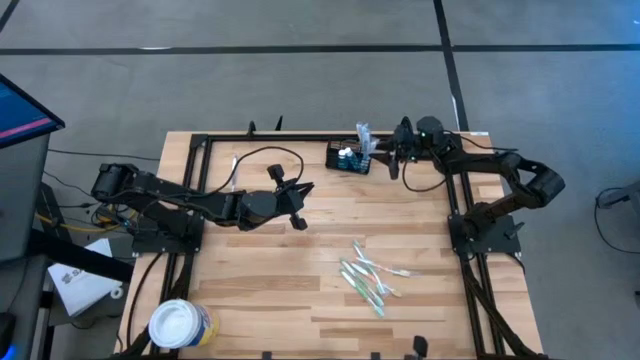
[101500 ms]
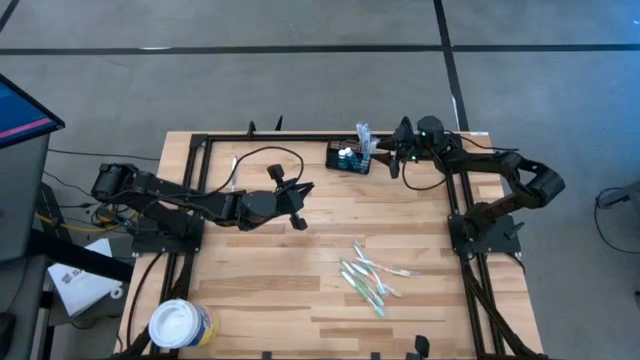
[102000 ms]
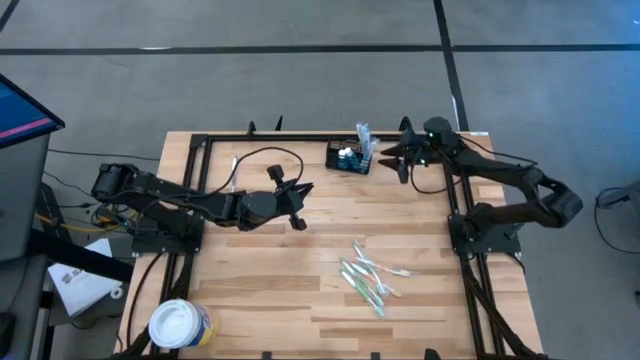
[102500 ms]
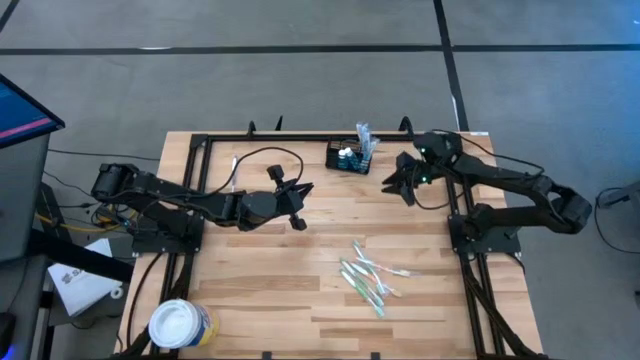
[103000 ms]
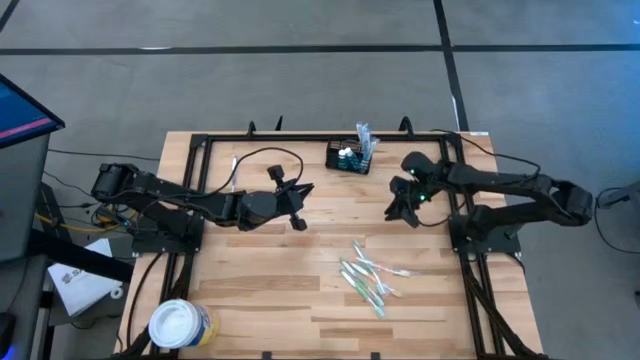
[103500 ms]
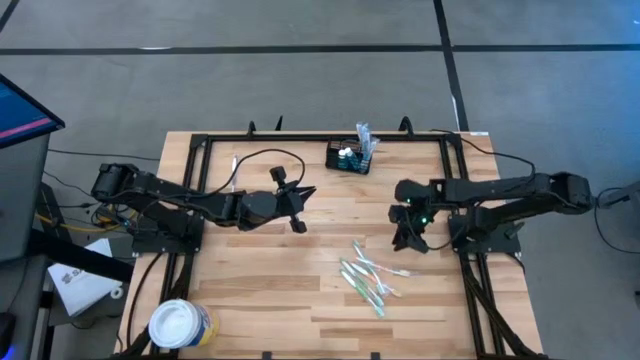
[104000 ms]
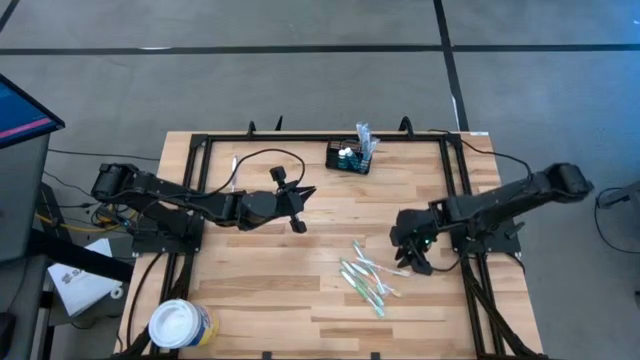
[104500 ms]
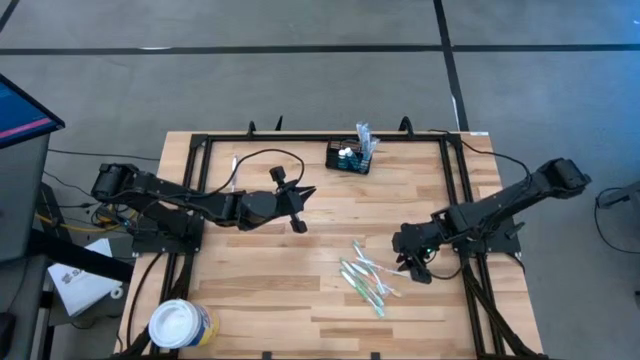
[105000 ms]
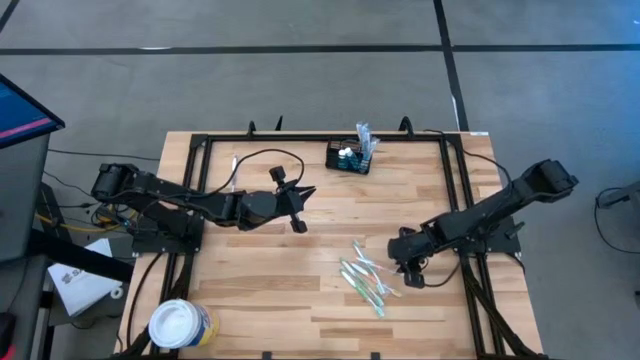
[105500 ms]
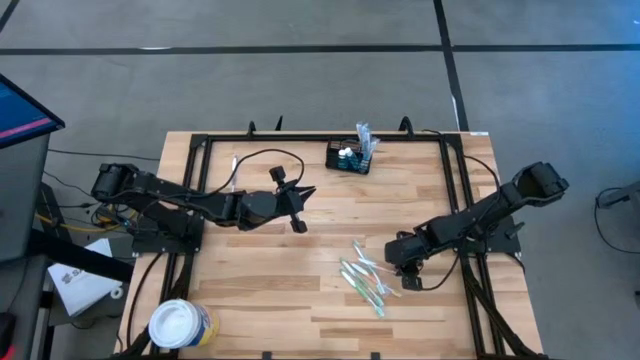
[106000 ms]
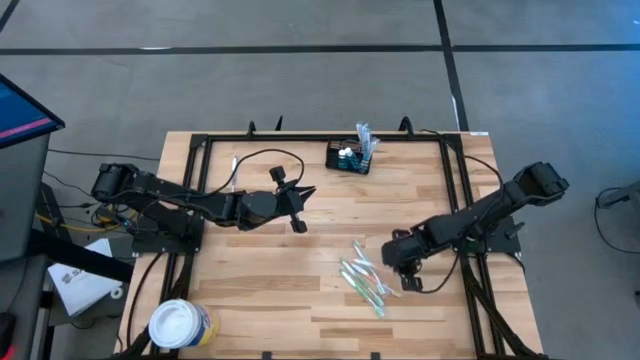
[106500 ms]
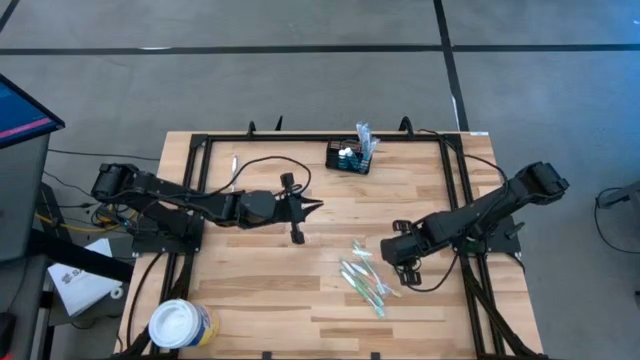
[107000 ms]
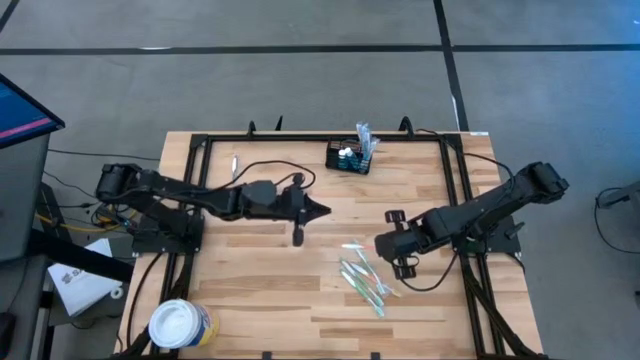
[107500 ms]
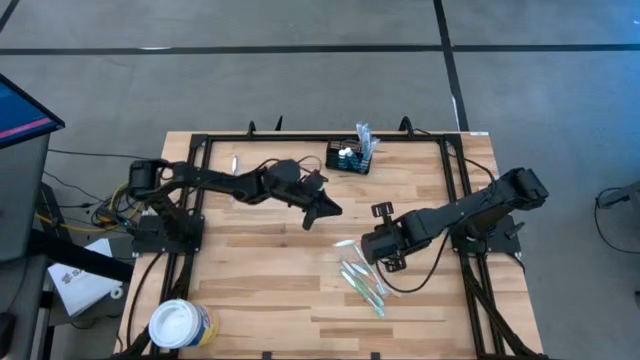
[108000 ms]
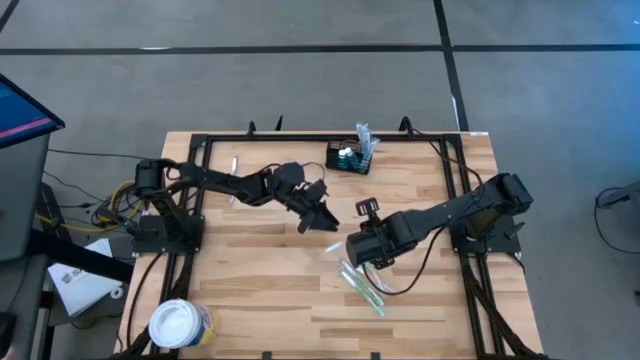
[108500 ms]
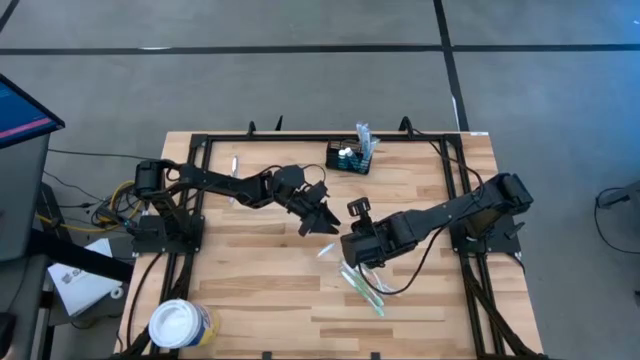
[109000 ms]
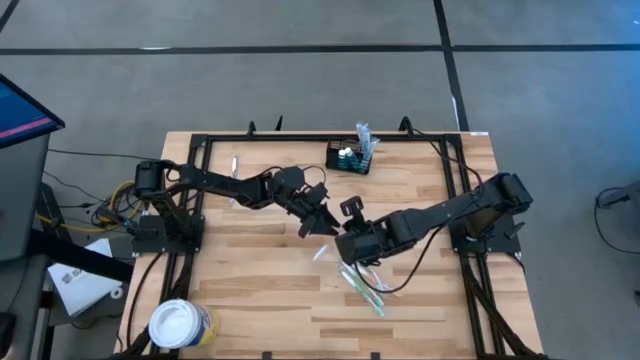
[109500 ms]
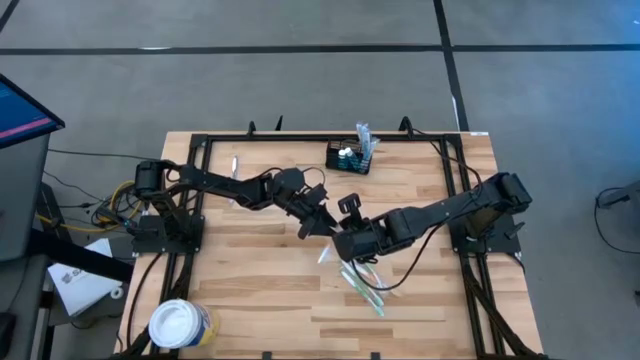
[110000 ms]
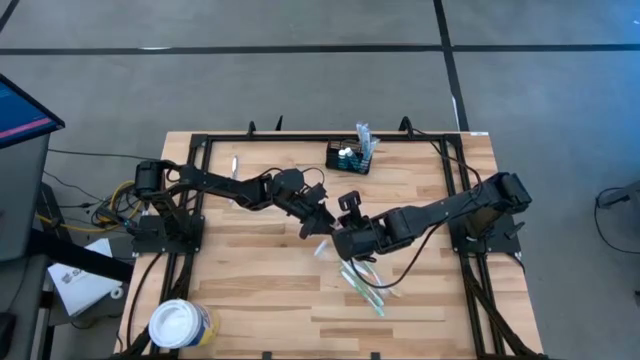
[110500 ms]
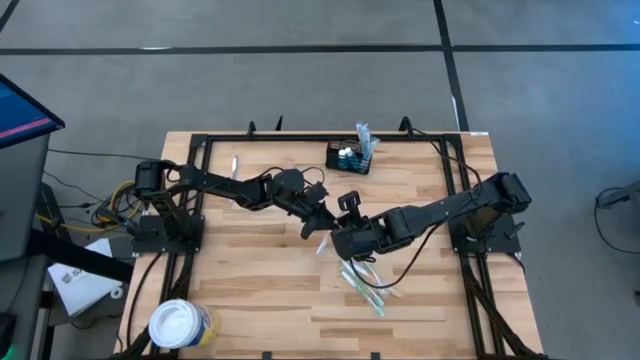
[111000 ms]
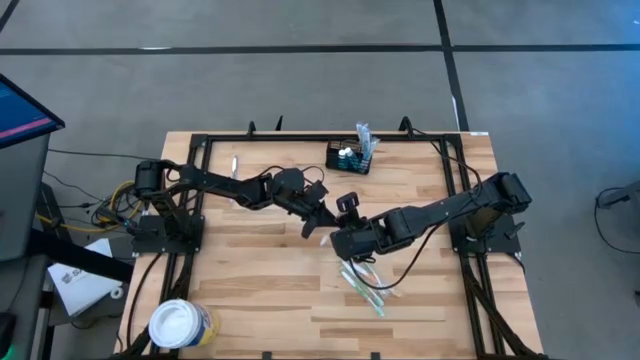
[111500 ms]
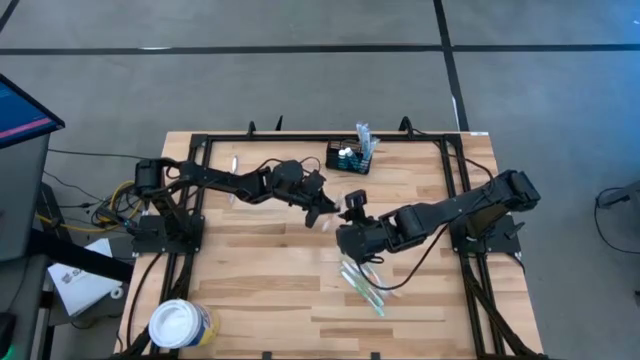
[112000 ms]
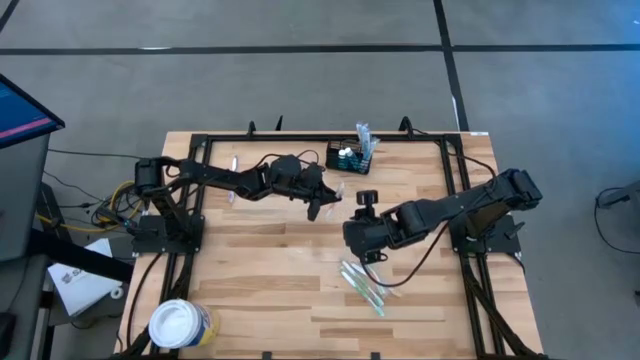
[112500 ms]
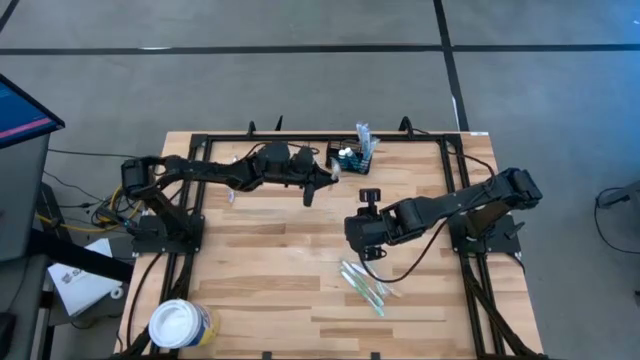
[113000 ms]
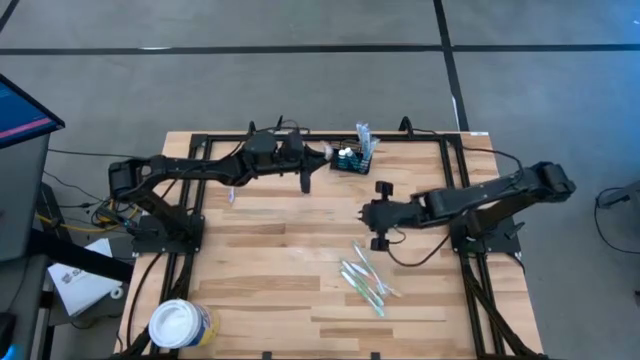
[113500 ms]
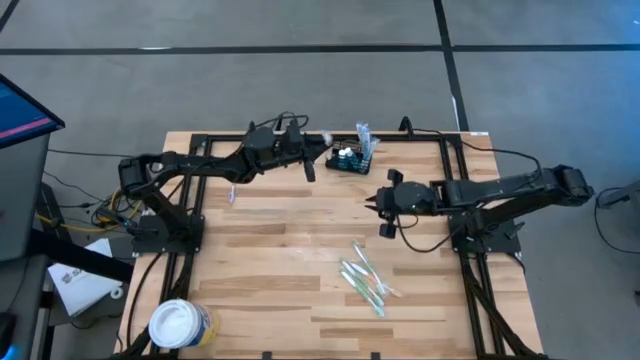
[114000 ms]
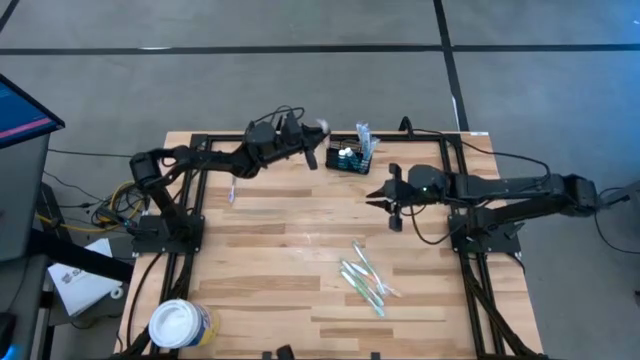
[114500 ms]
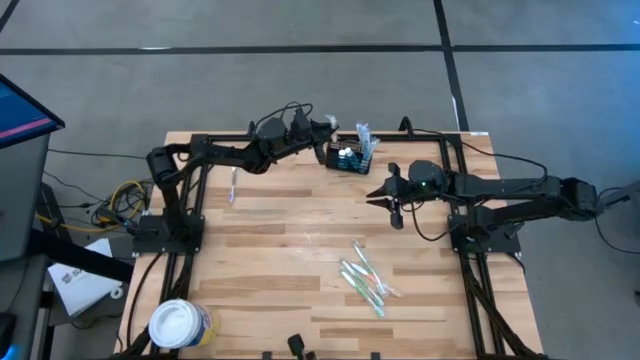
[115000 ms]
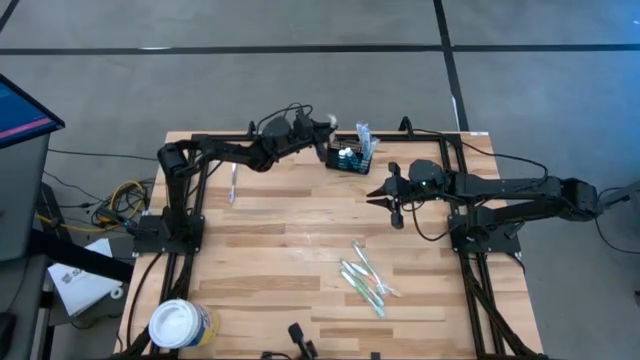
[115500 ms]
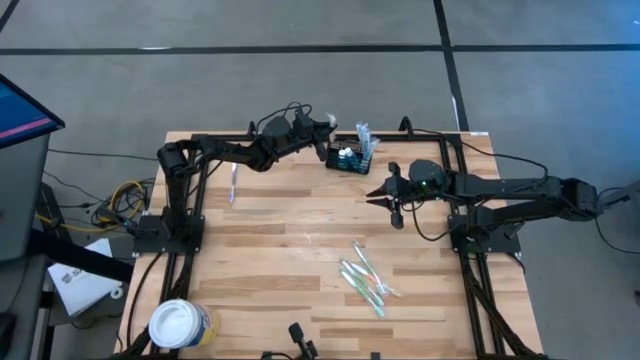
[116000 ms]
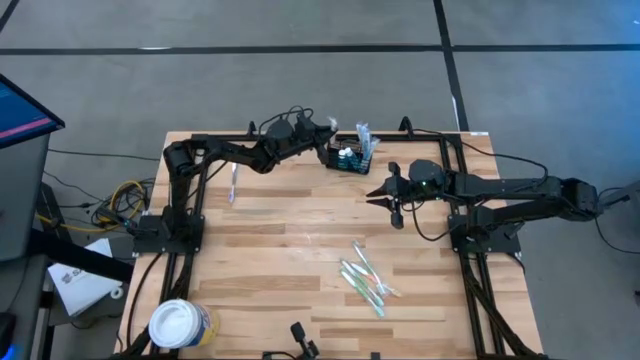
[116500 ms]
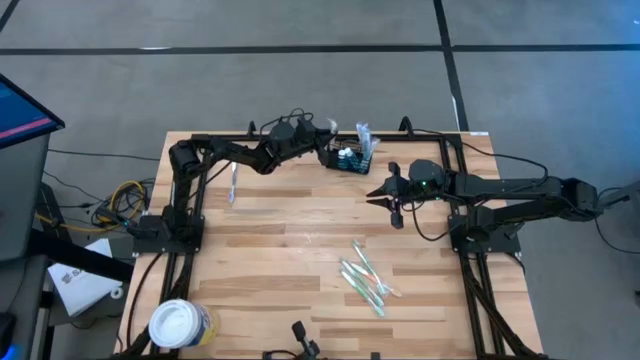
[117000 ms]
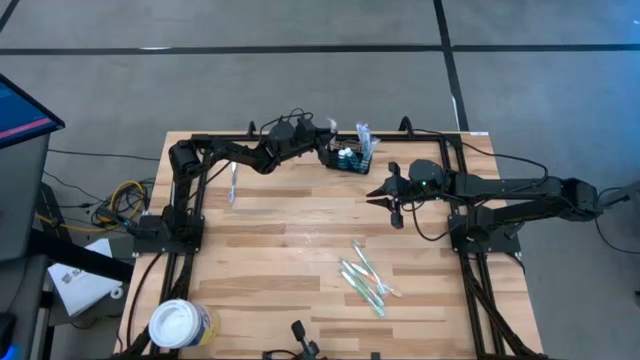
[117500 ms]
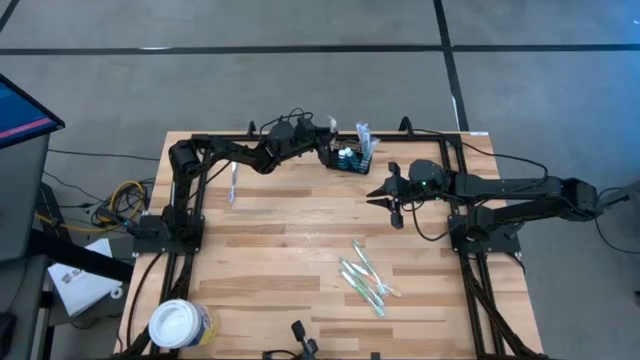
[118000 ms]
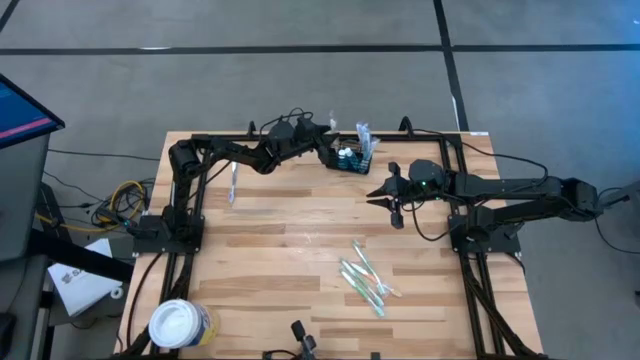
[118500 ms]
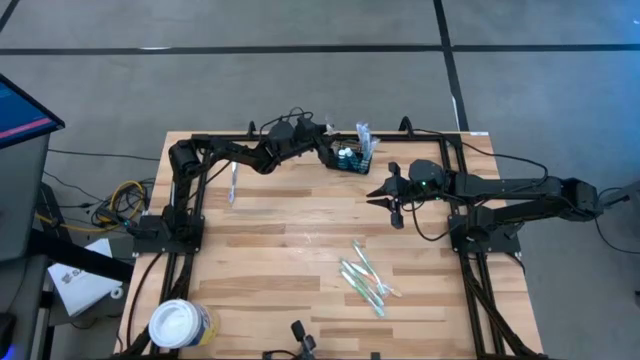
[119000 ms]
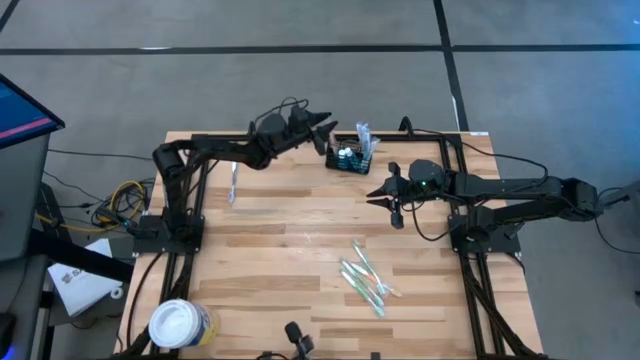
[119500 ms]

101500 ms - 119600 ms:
Task: Pick & Place toothbrushing station
Put the orange toothbrush into the mesh organizer

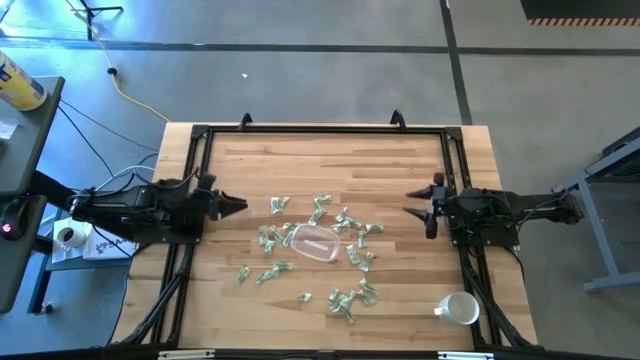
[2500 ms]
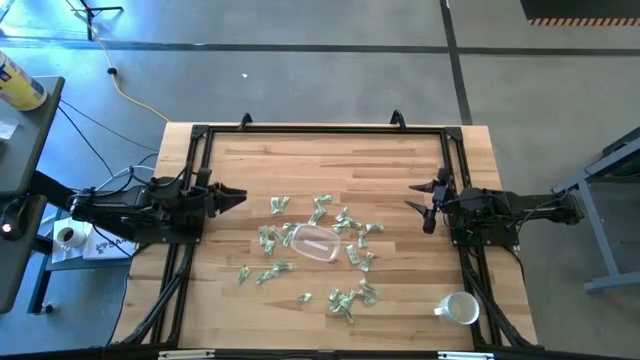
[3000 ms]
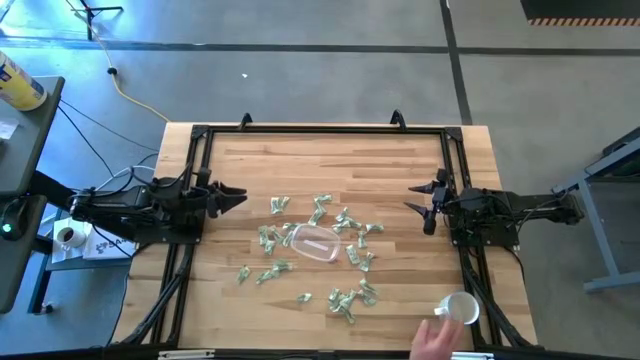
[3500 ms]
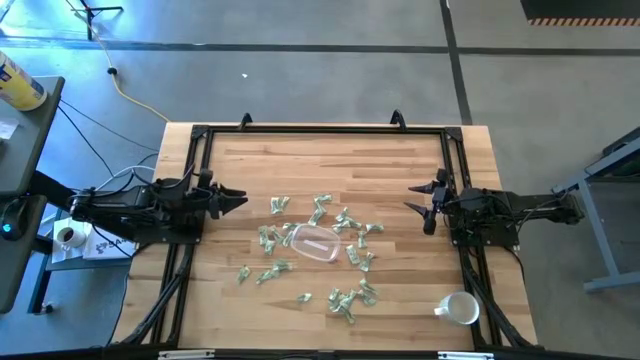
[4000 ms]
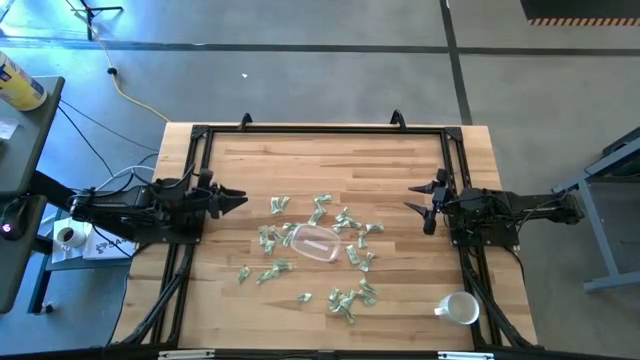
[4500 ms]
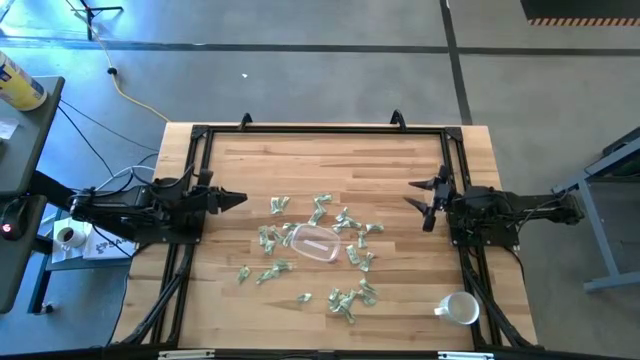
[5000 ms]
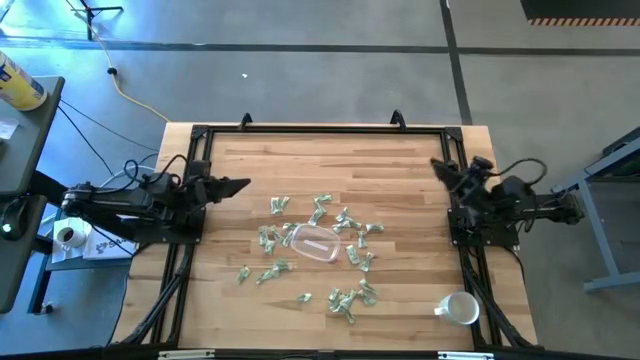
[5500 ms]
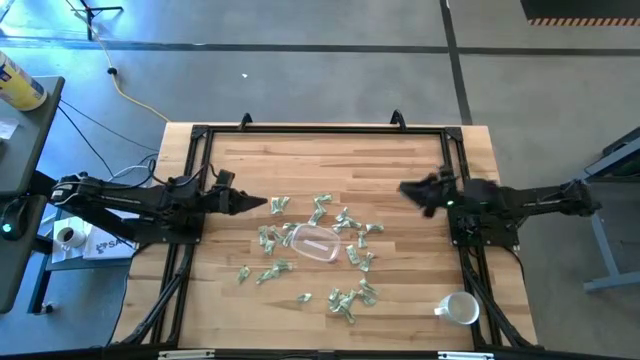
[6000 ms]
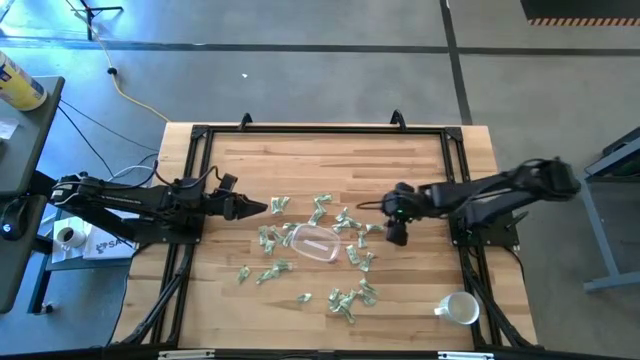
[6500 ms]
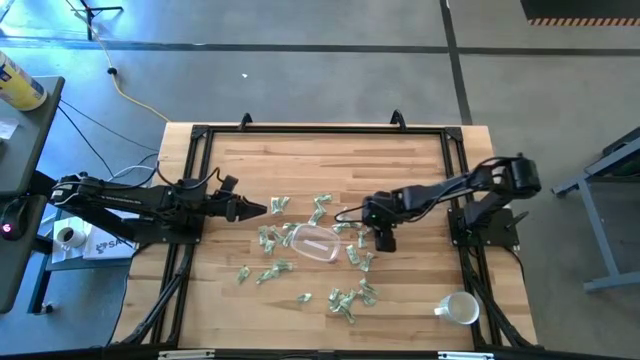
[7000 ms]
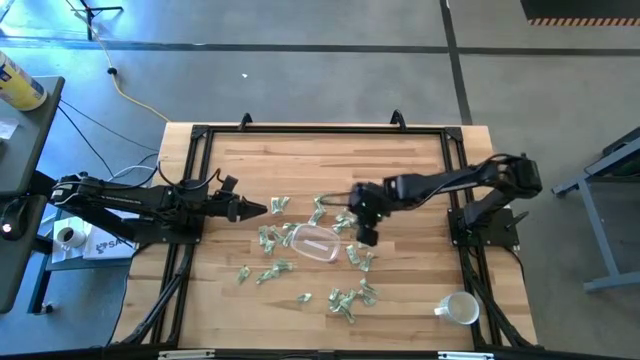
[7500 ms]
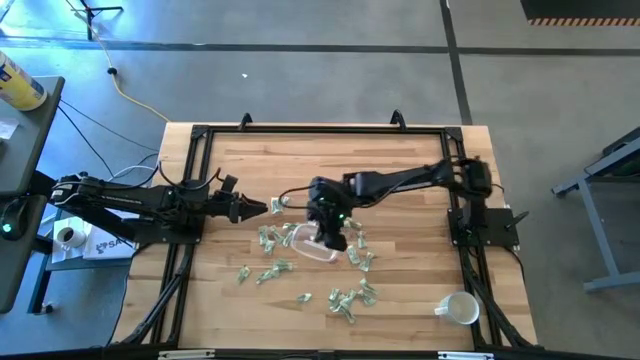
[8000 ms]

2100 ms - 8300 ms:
Task: Pick and place Stevia / Truvia into bins
Put the green stevia packet into the transparent bin
